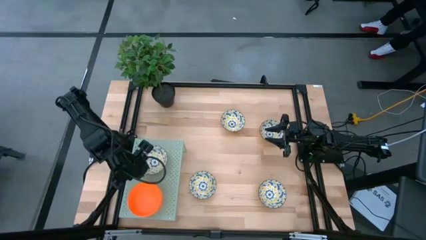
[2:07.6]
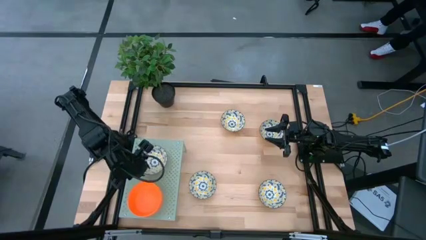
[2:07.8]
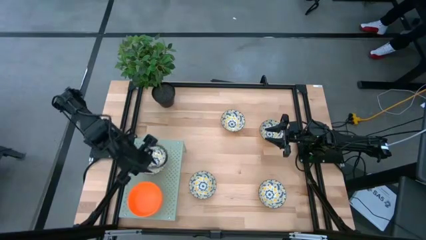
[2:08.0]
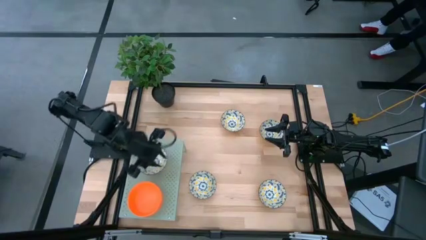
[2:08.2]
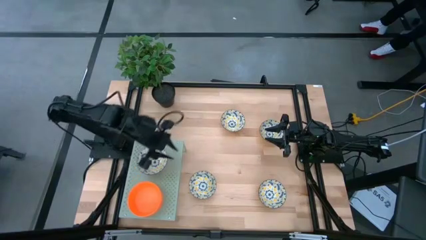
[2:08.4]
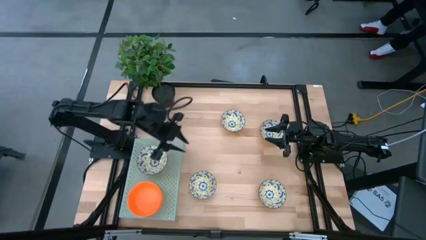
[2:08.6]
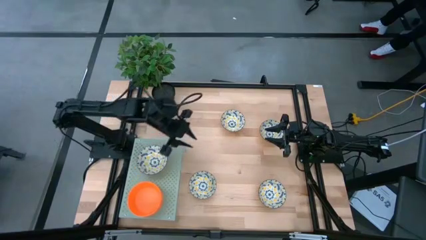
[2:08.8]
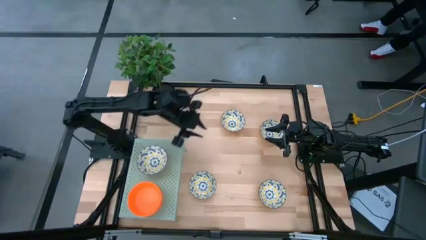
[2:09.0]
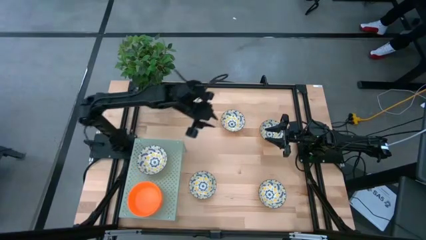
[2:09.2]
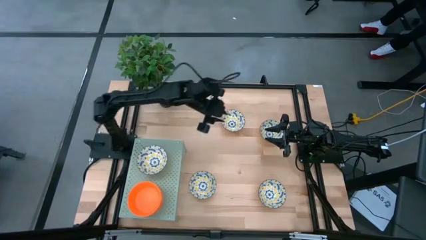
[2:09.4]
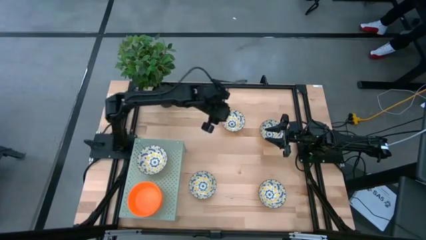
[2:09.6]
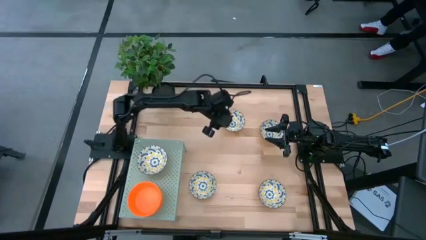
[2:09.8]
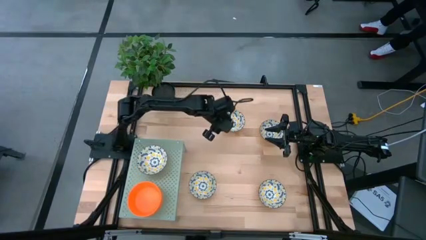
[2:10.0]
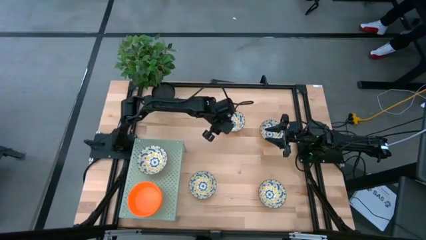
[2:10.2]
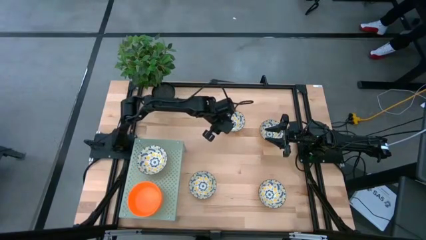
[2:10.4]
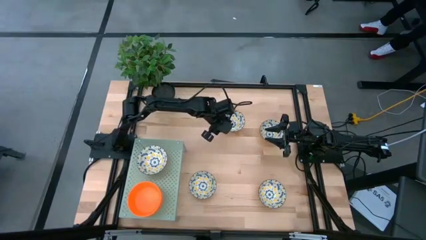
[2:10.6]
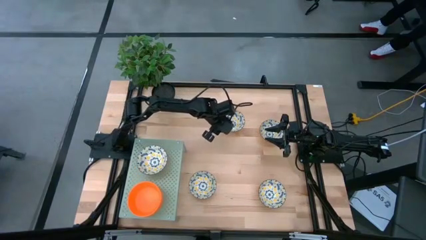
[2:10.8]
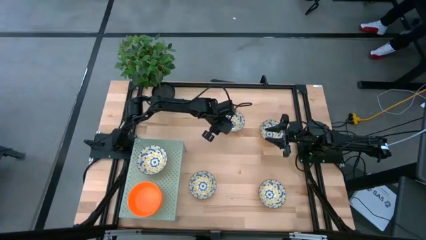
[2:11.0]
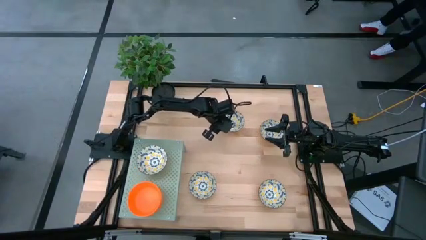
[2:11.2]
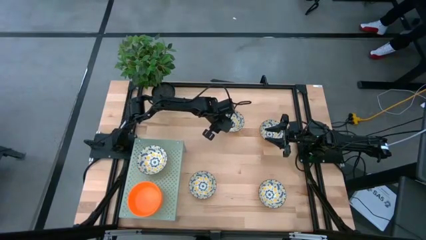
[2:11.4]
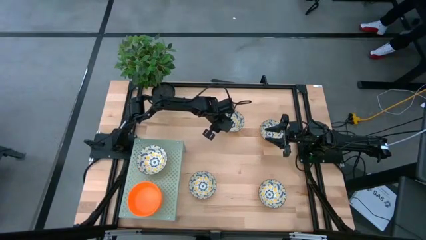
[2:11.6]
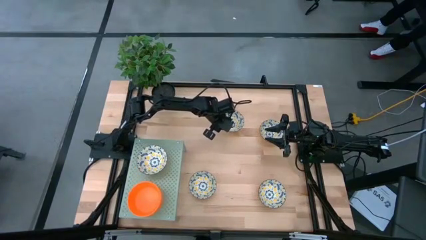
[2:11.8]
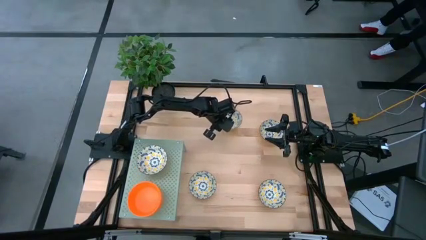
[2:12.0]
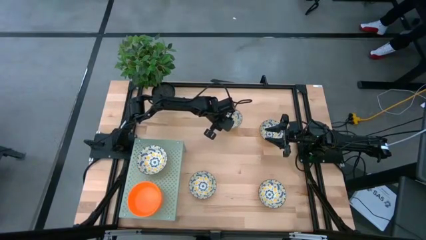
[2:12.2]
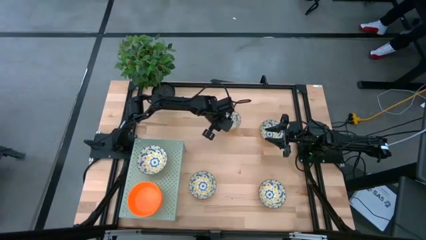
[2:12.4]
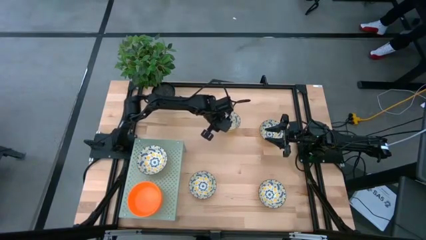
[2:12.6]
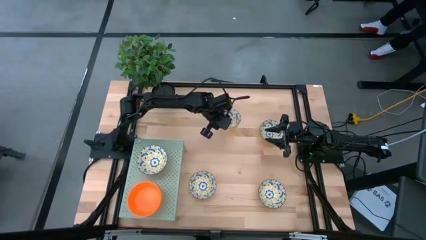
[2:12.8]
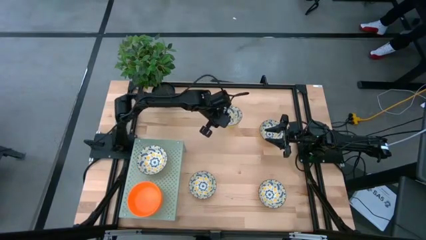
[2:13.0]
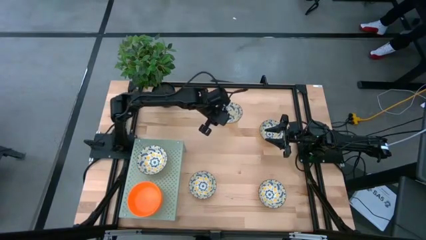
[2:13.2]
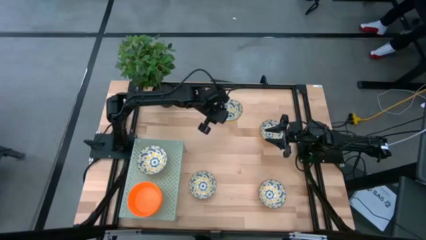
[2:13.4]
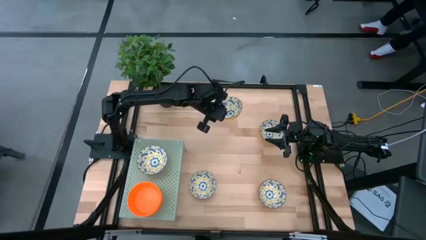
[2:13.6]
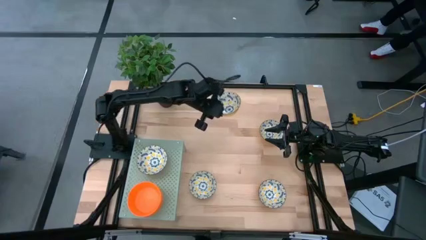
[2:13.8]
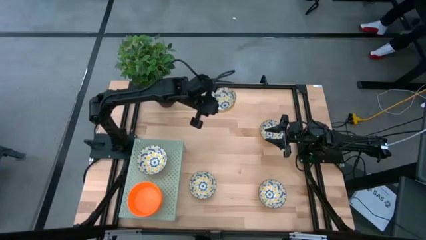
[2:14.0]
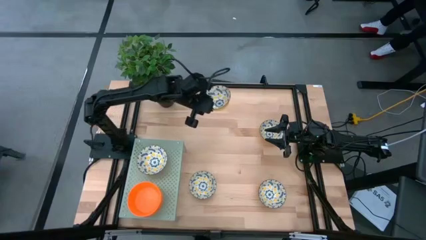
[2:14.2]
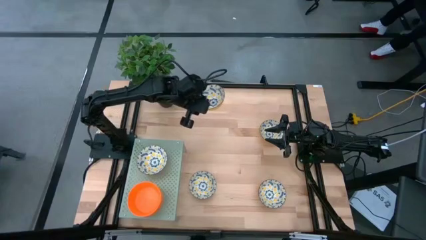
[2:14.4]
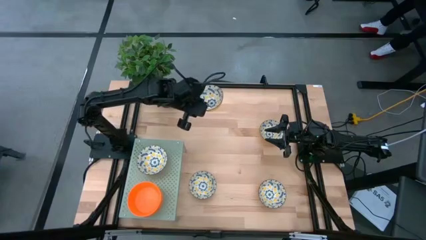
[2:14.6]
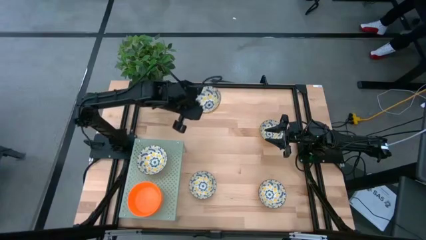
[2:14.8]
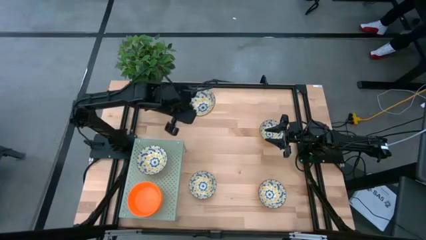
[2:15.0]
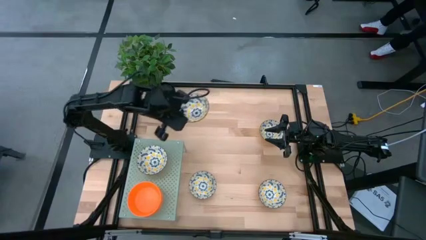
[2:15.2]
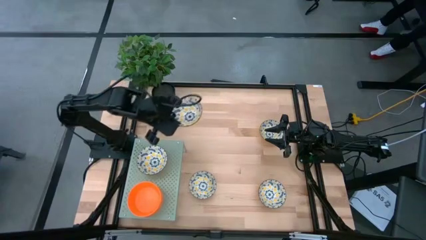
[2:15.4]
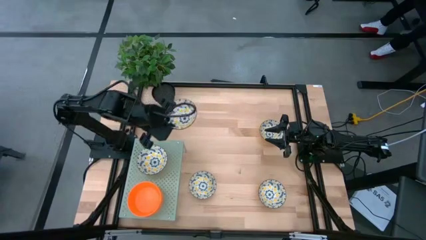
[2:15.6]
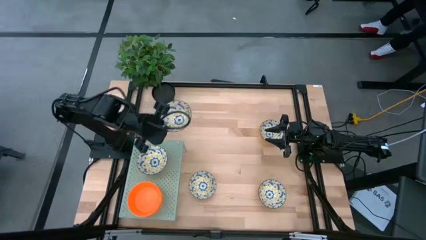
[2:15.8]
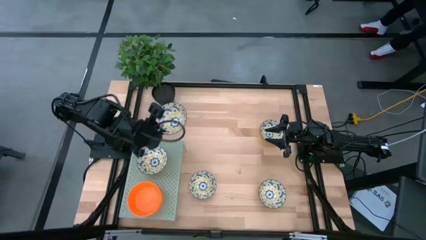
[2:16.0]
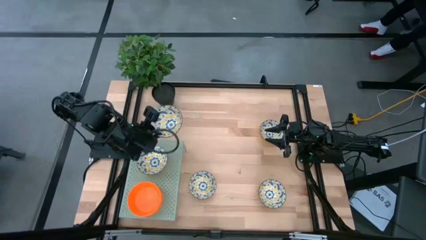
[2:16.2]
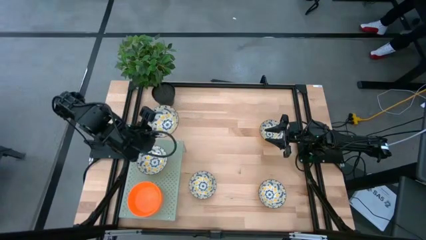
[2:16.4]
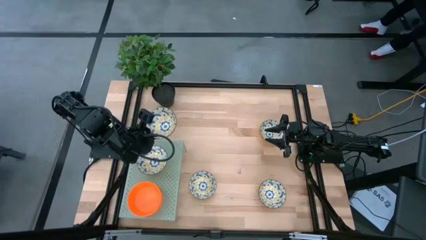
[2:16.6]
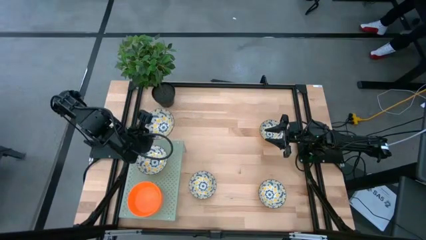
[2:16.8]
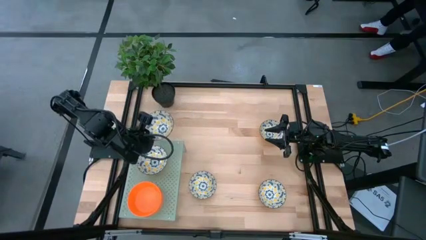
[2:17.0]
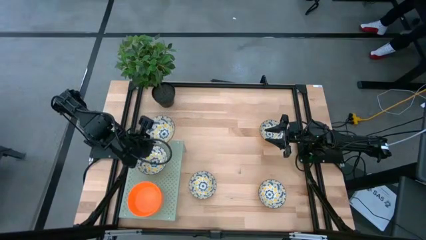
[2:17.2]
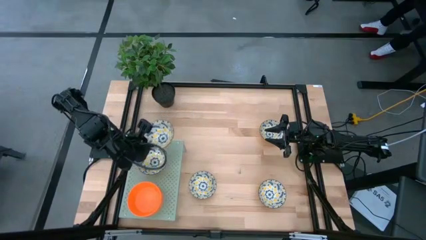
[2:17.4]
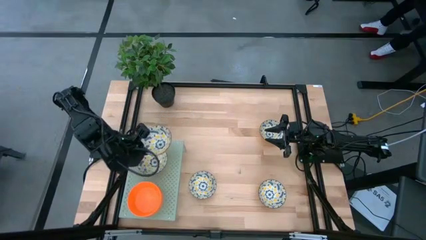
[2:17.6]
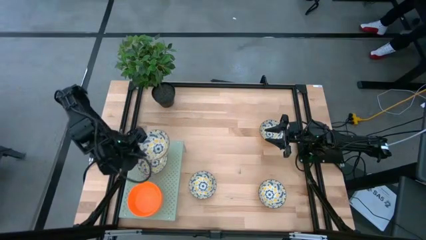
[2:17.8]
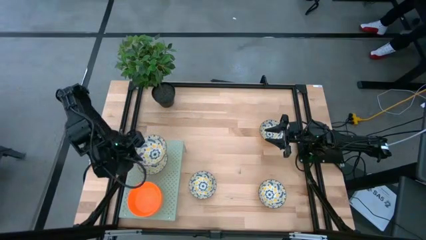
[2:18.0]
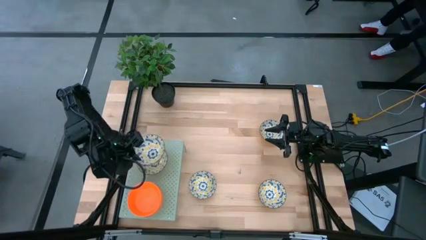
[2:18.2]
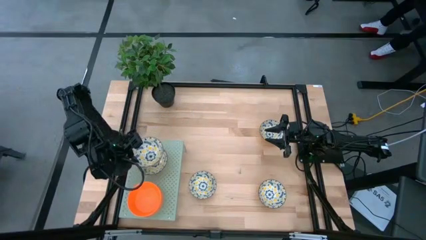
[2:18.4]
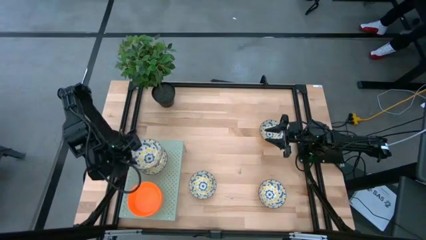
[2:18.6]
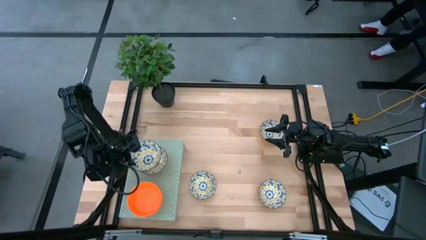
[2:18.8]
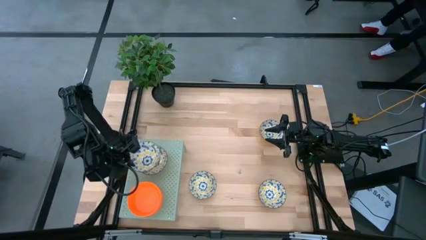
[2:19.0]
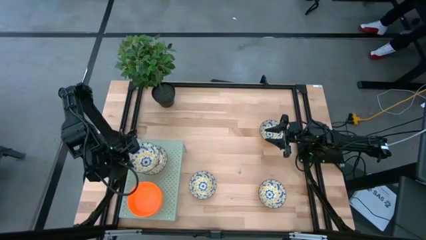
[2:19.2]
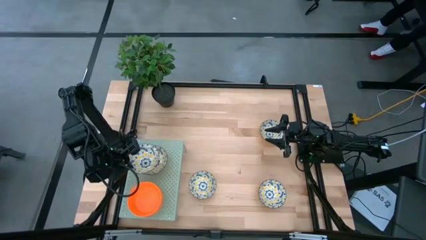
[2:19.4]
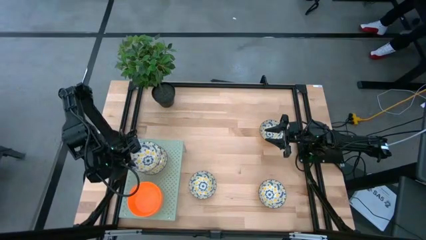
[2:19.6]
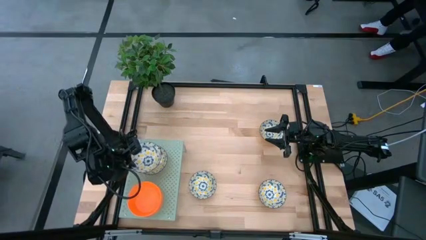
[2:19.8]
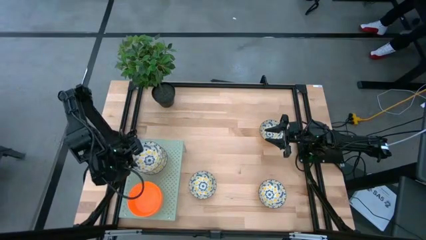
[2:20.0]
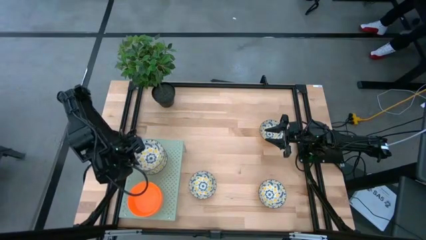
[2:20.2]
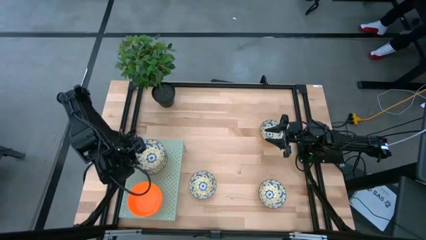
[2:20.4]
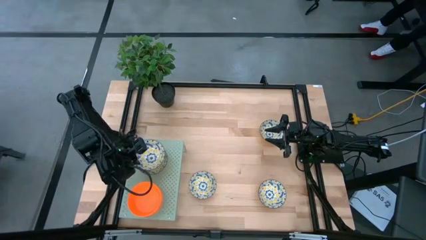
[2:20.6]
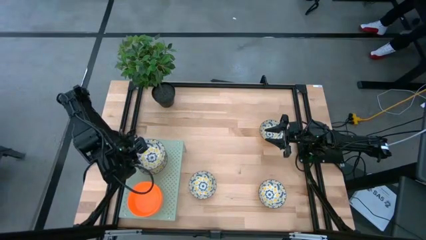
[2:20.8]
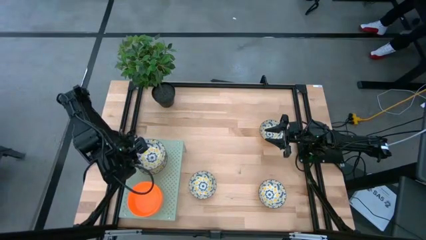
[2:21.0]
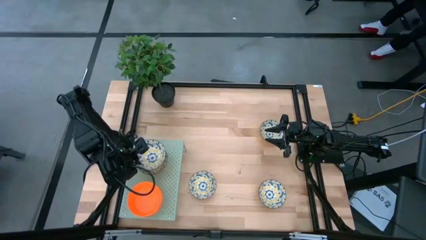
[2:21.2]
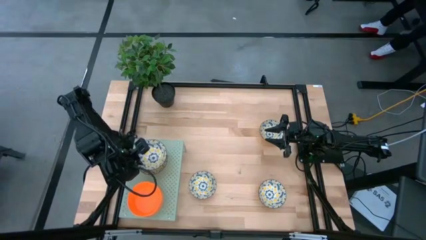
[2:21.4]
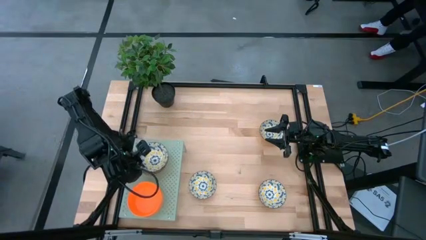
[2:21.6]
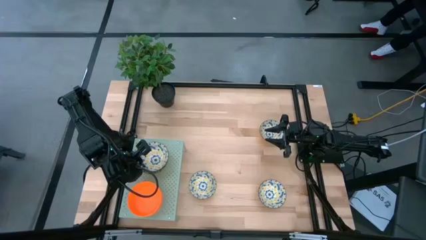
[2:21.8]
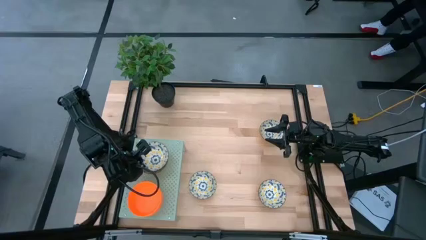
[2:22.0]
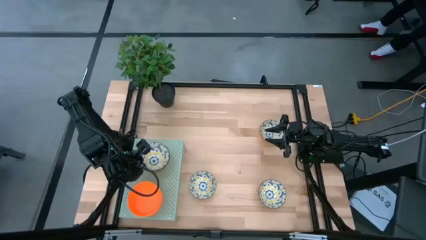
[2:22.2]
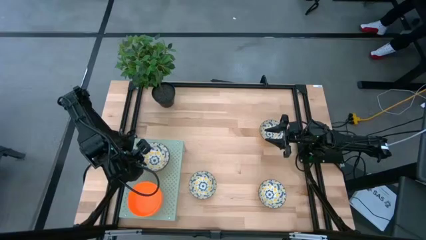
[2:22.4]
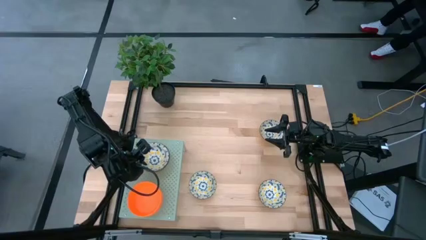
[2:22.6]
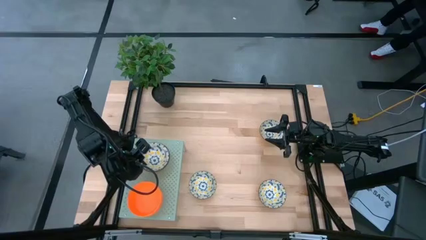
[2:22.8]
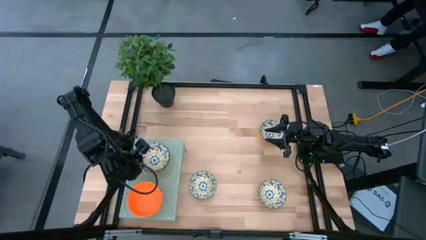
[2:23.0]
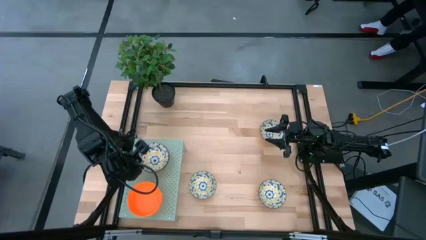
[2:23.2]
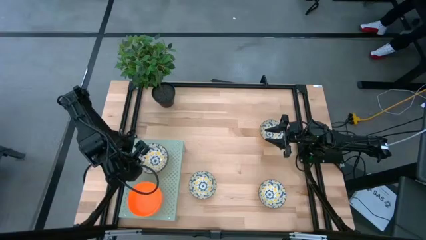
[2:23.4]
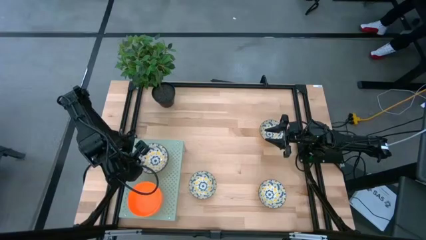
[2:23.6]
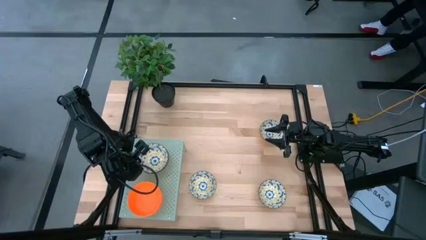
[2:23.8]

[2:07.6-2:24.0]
Task: Pick & Place Mini bowls
Stack the patterned bowl on top of the patterned bowl on the shelf
